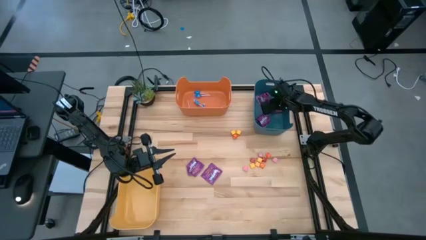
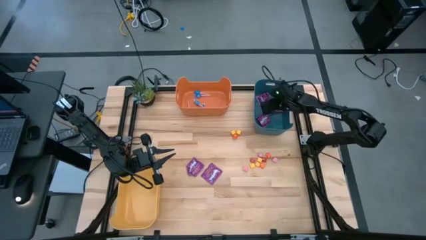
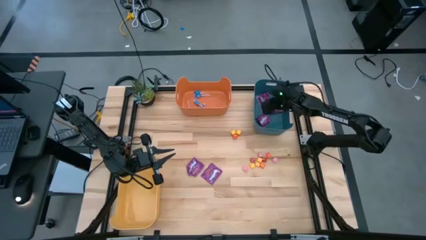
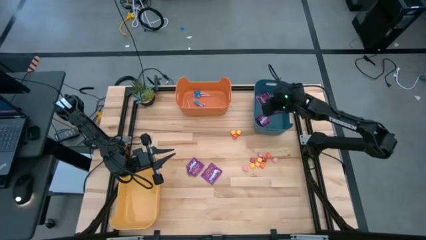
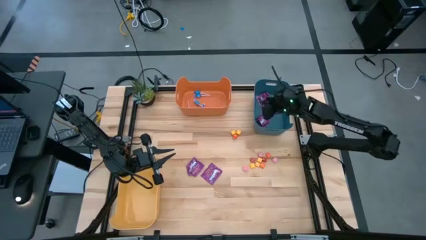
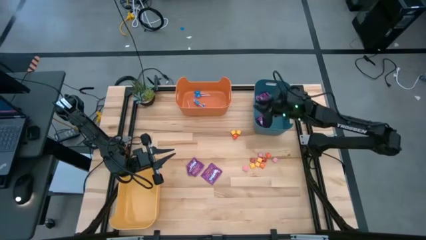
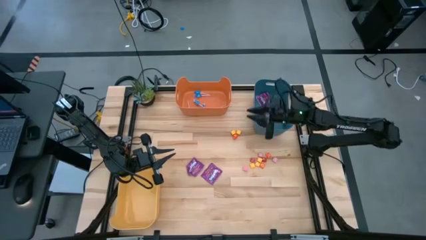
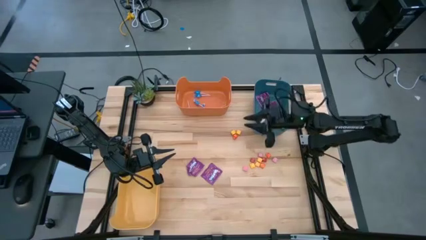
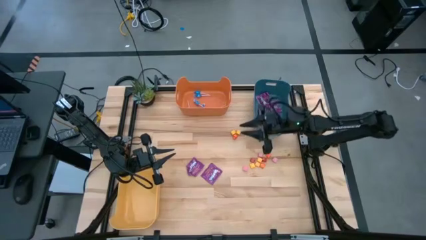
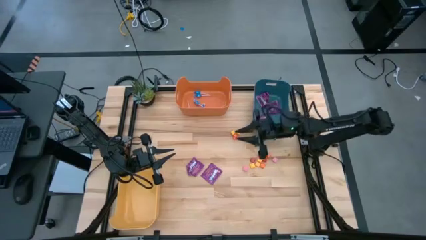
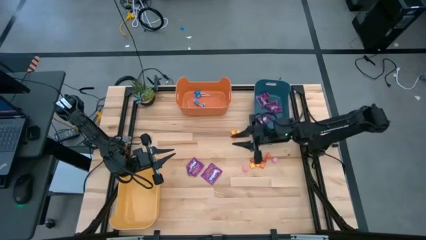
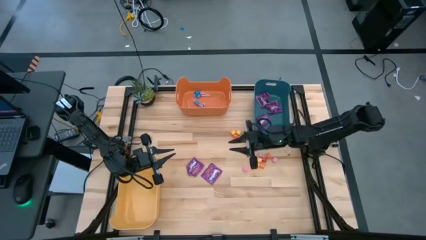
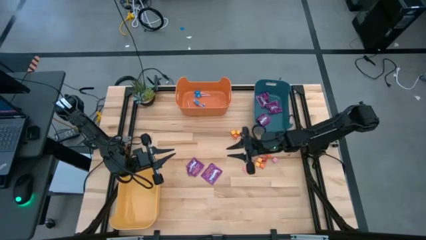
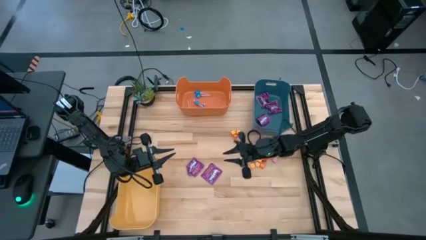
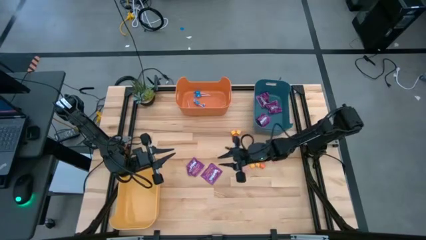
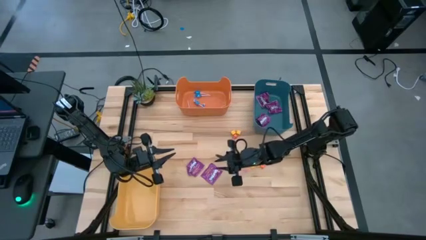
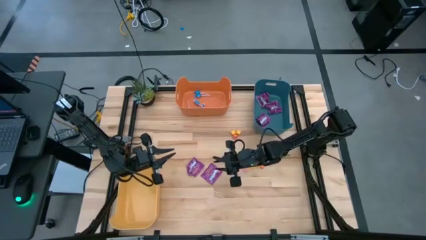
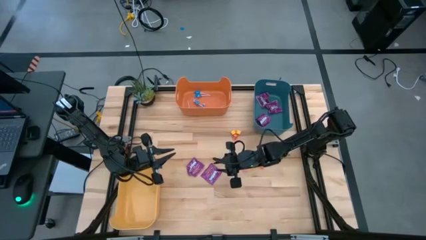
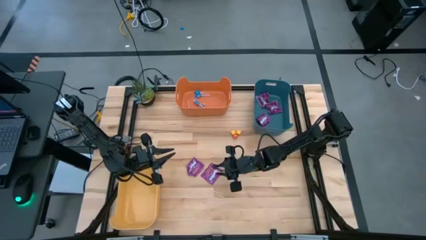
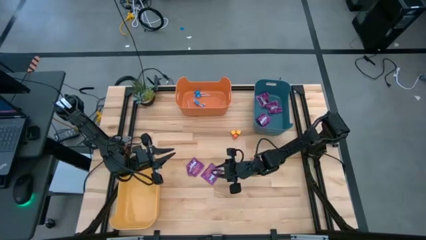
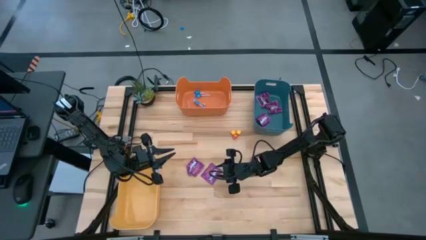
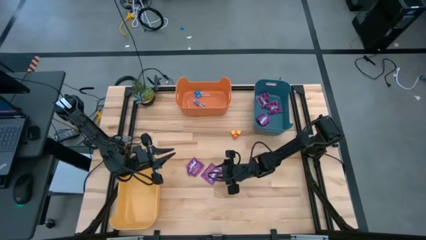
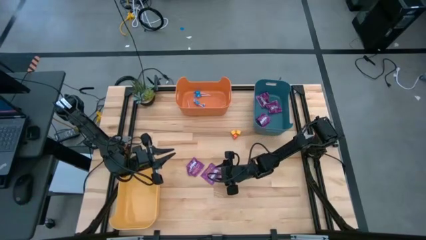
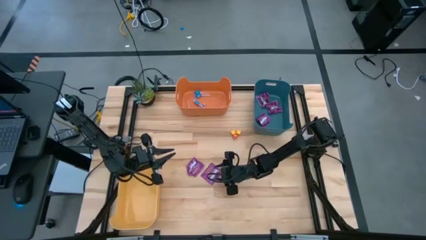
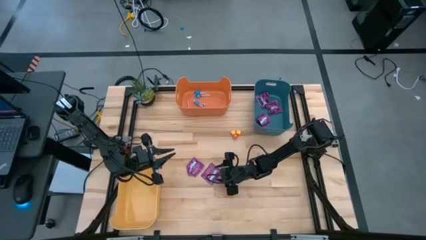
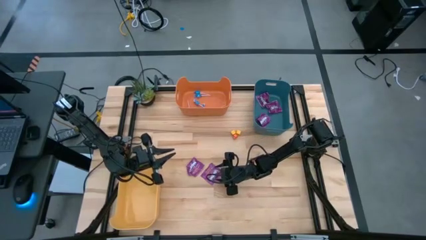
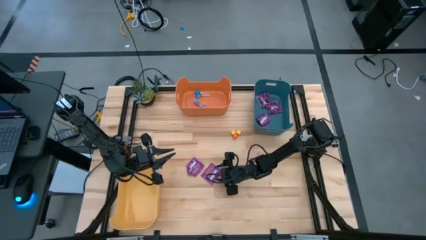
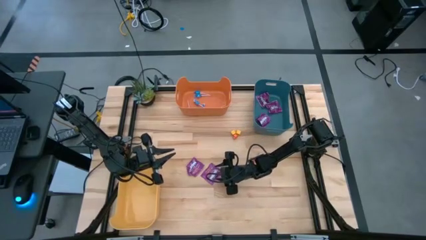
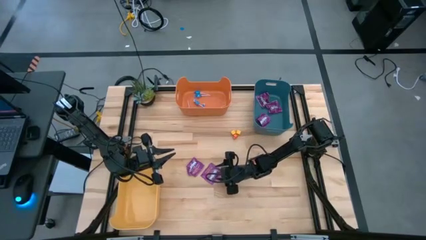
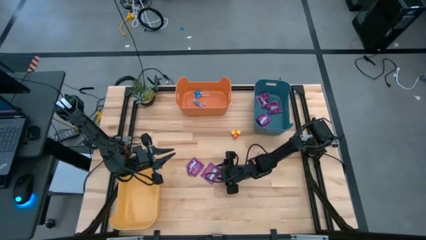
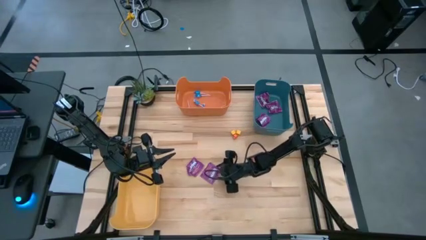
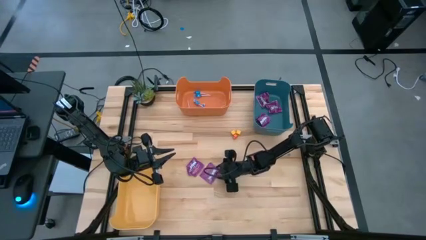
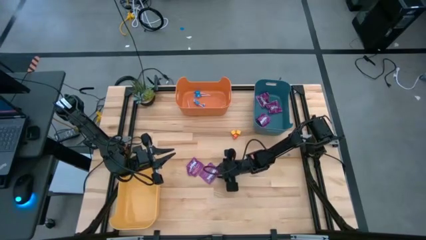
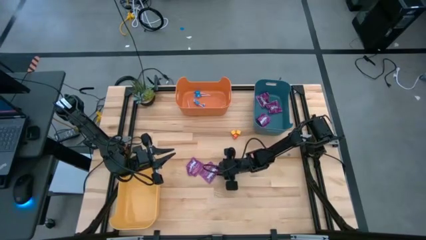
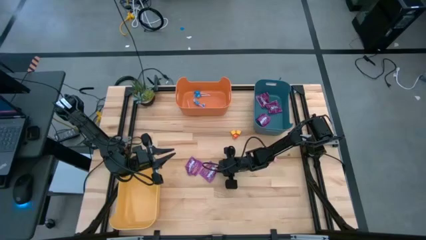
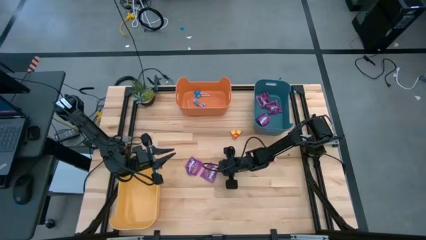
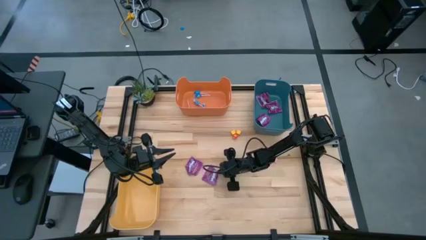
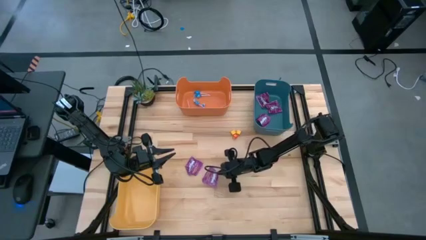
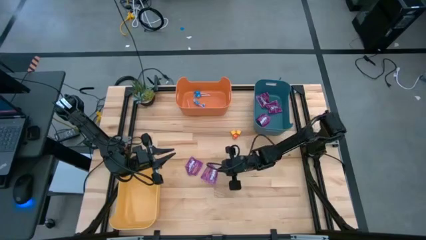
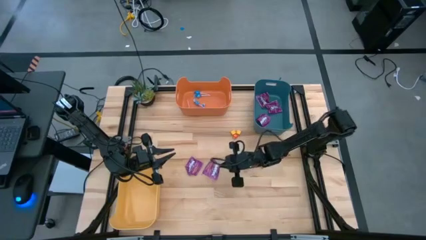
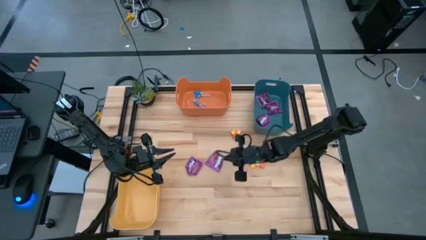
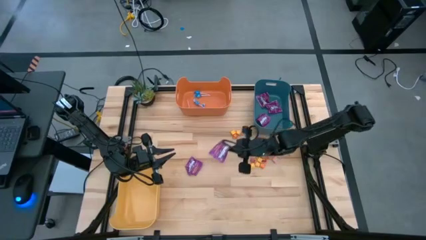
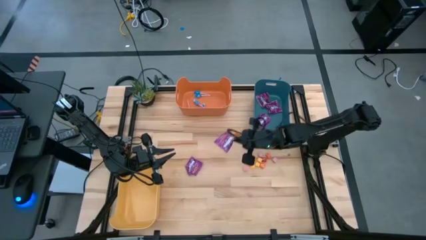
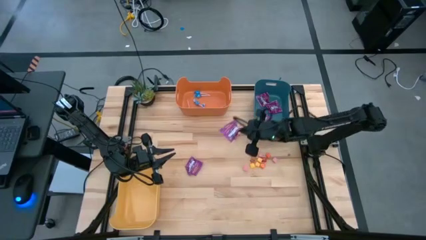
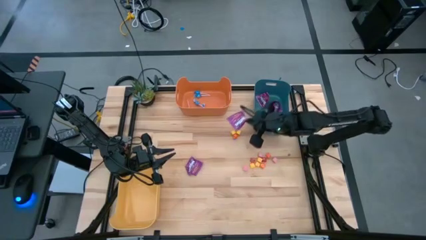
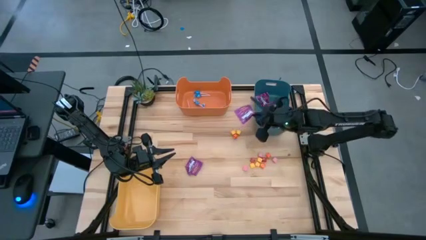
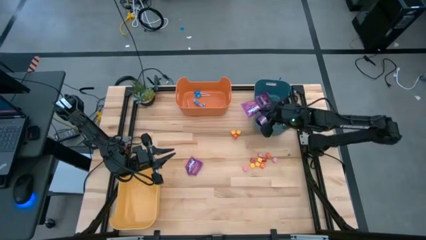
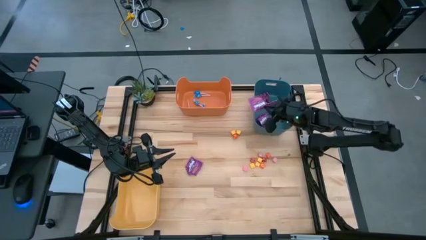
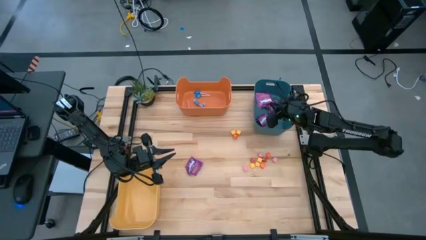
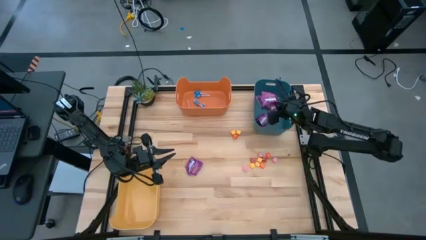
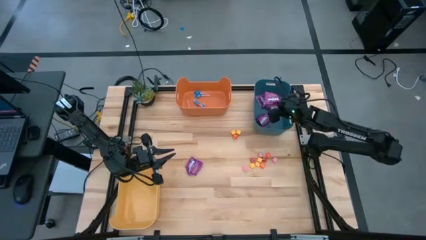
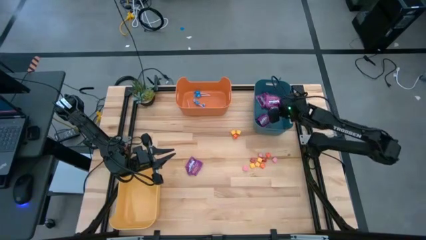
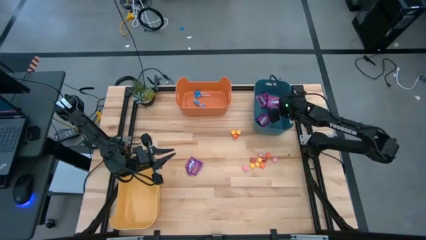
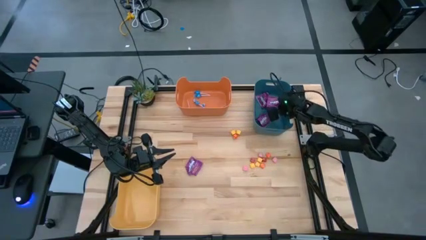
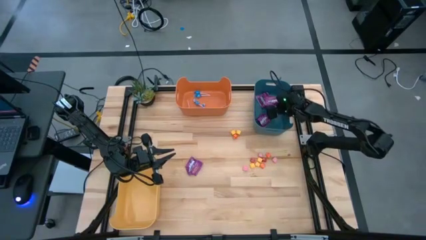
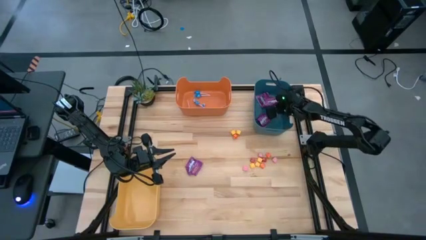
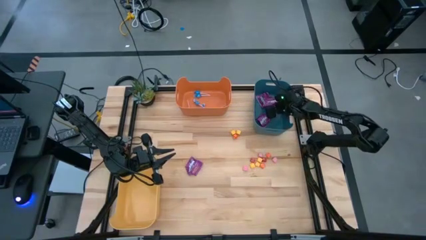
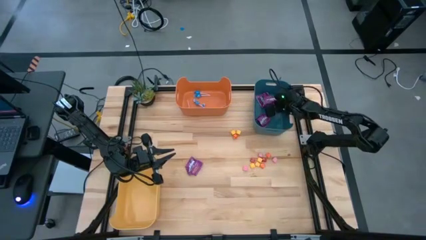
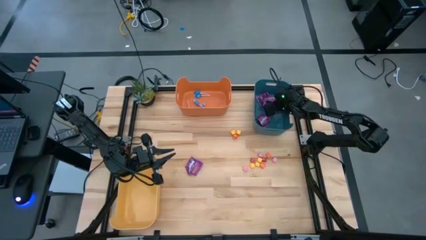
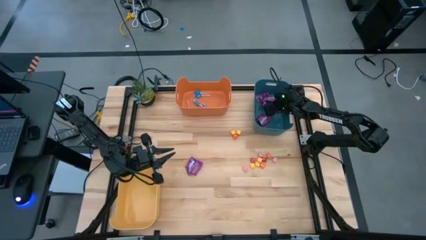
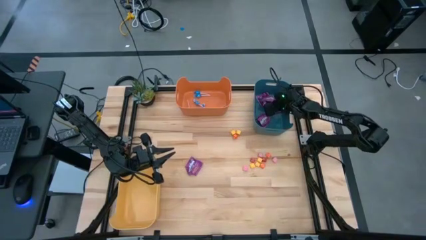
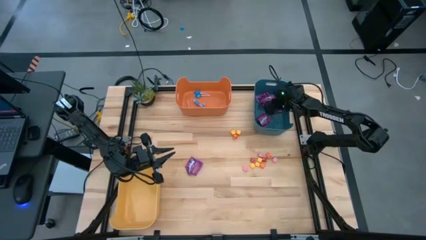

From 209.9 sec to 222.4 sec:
Task: Sort candy
Put the right purple candy into the blue bin

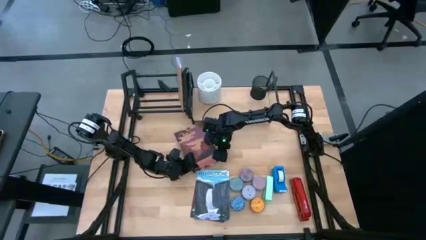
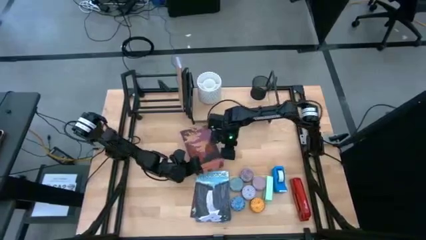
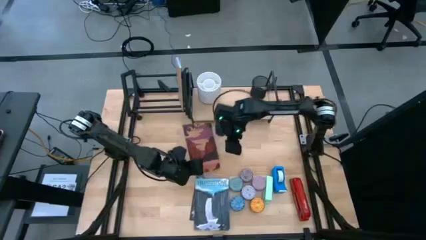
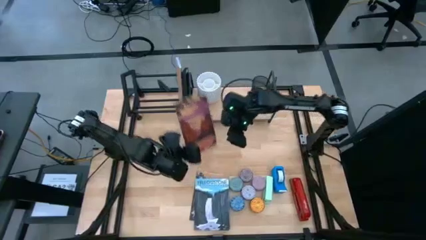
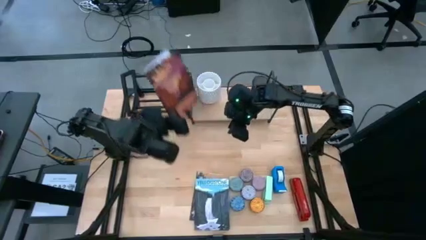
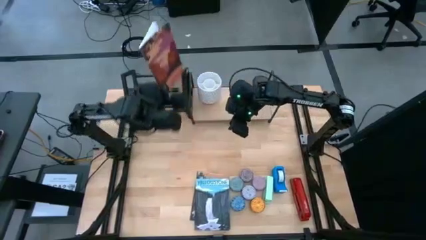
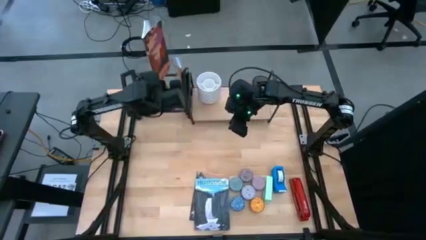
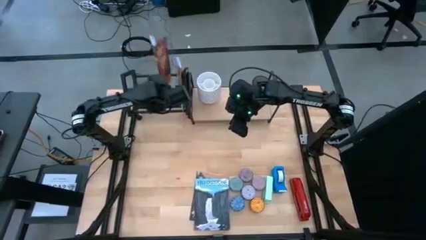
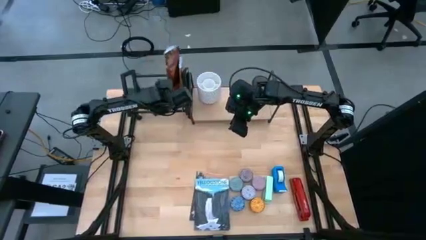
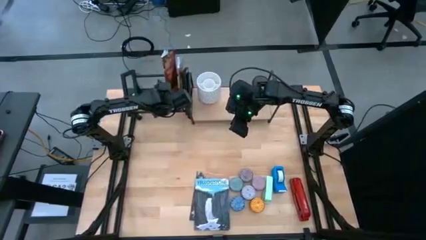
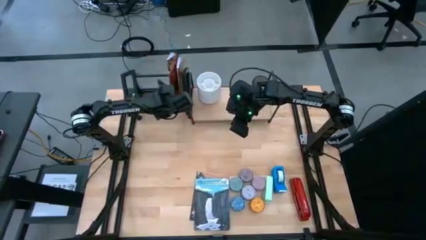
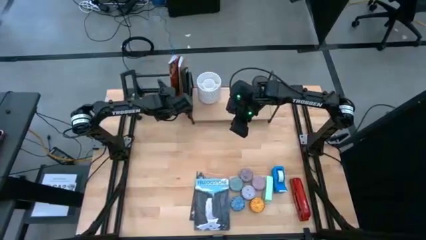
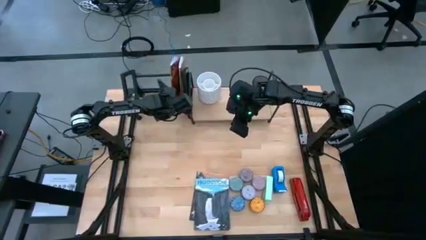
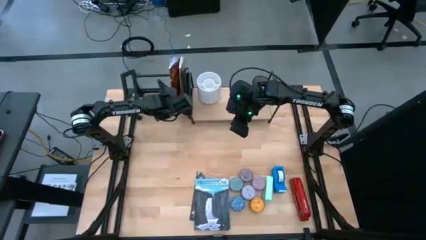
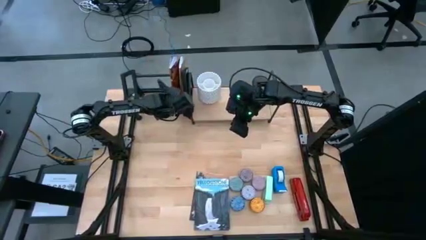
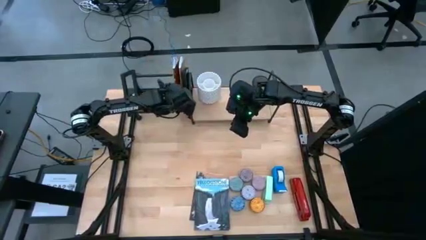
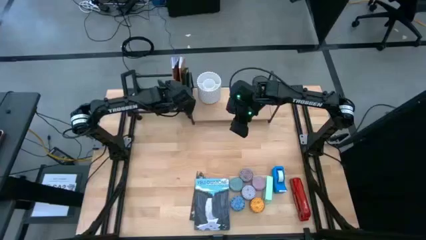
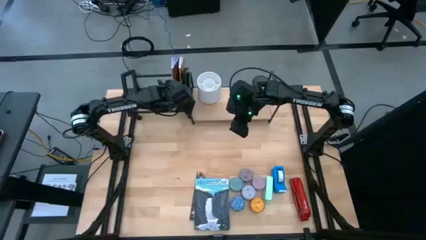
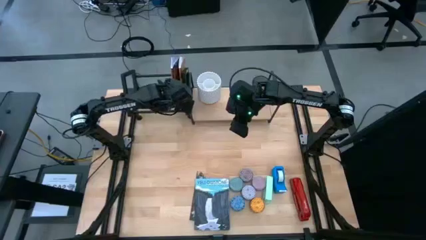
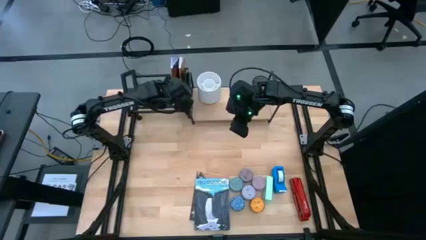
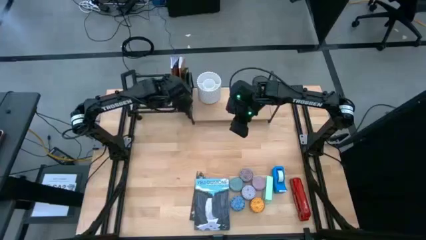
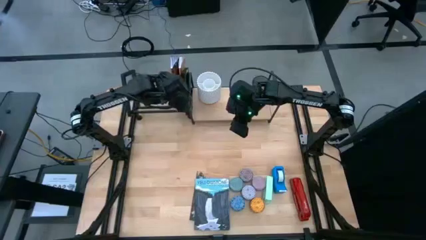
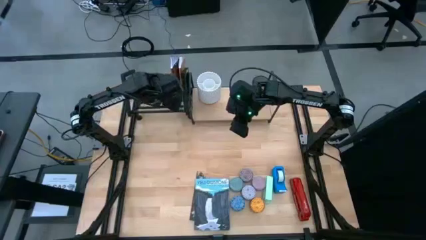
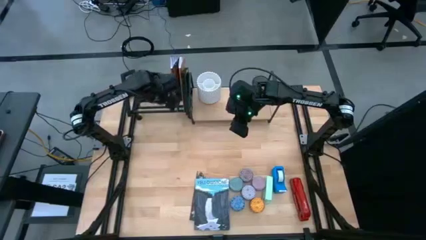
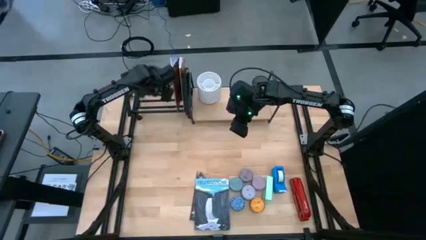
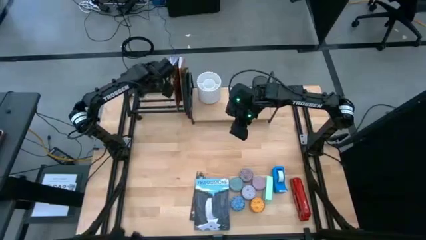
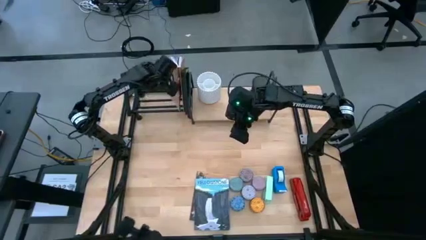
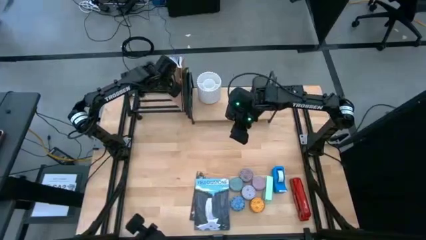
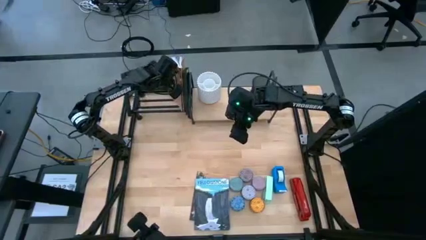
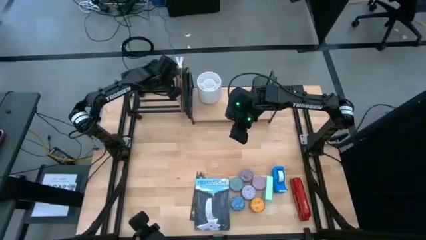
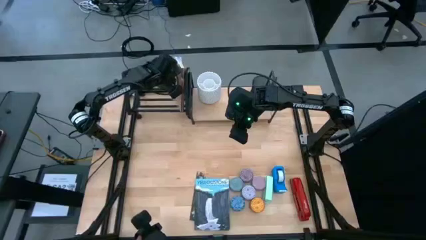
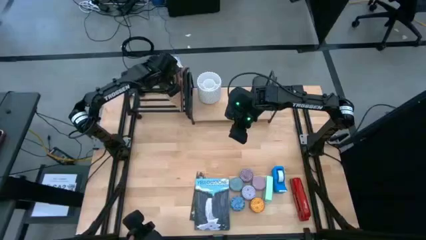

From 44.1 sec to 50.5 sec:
Task: Stock shelves
Put the brown book on the bookshelf
